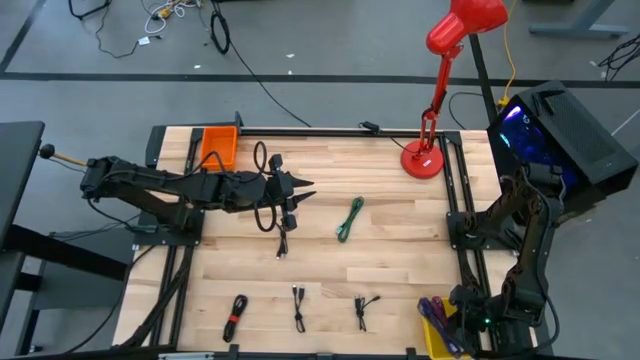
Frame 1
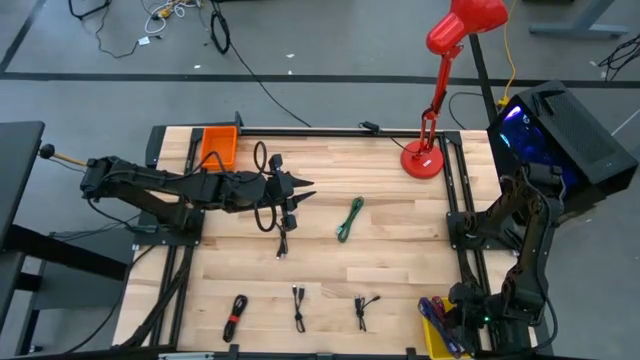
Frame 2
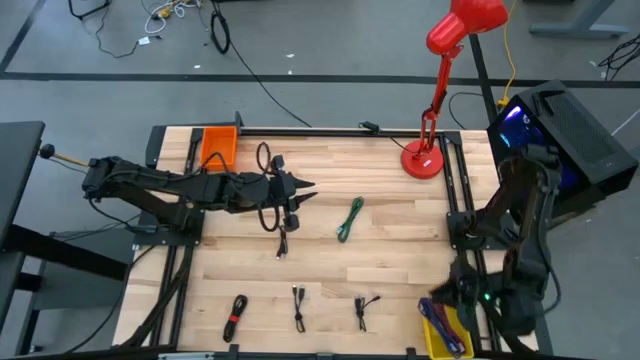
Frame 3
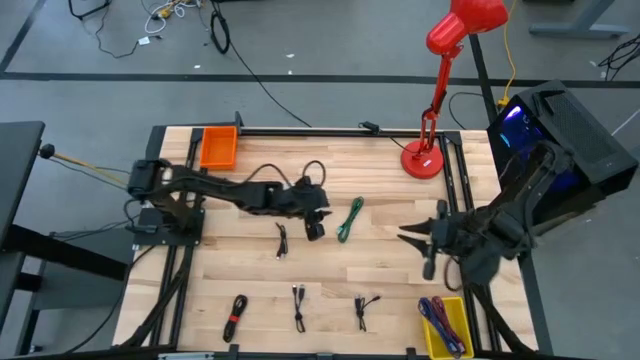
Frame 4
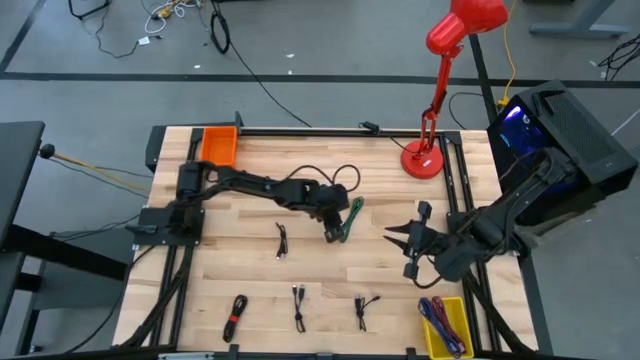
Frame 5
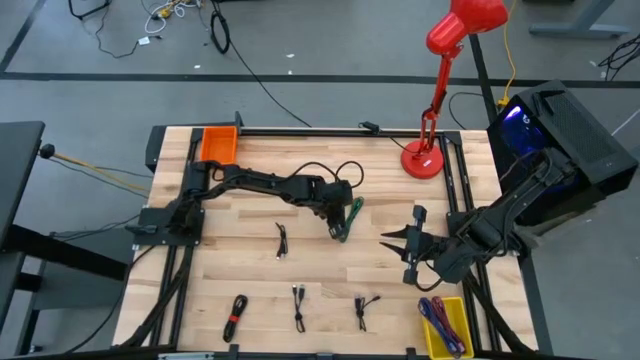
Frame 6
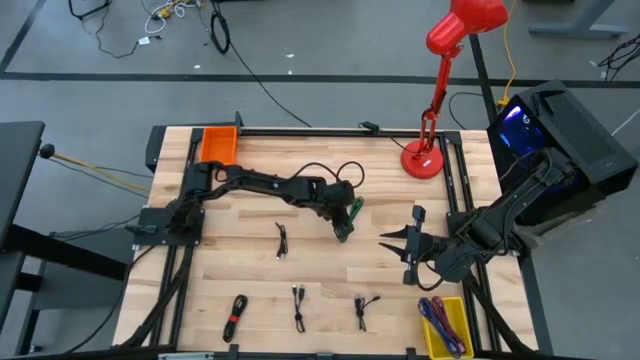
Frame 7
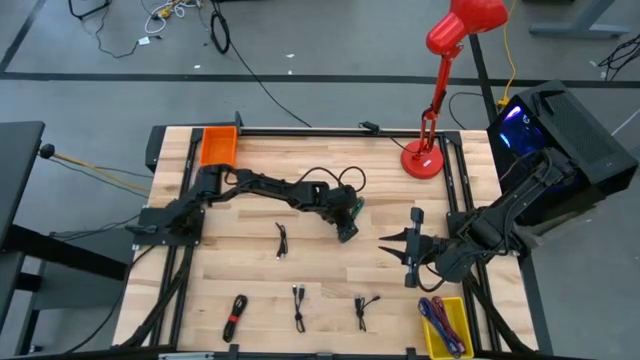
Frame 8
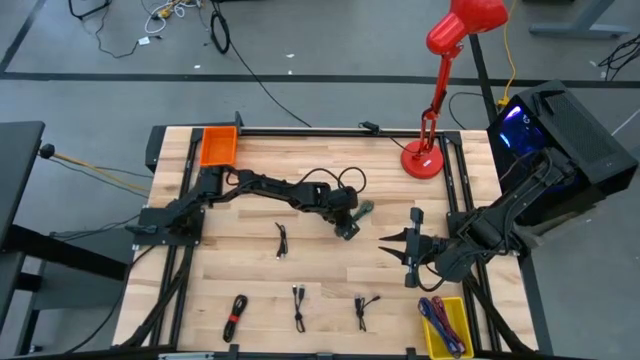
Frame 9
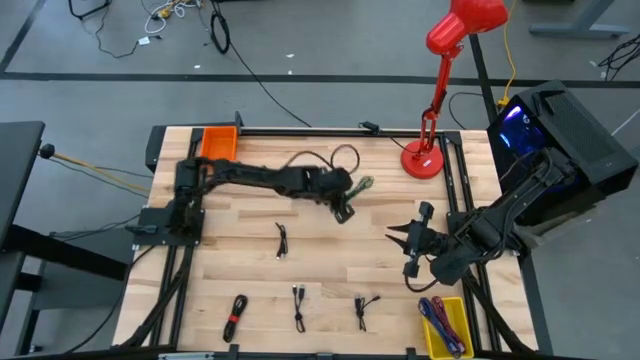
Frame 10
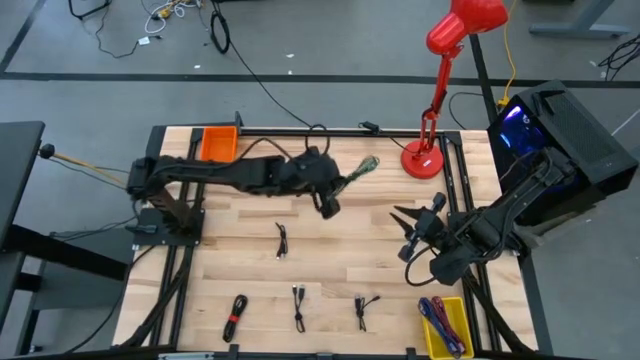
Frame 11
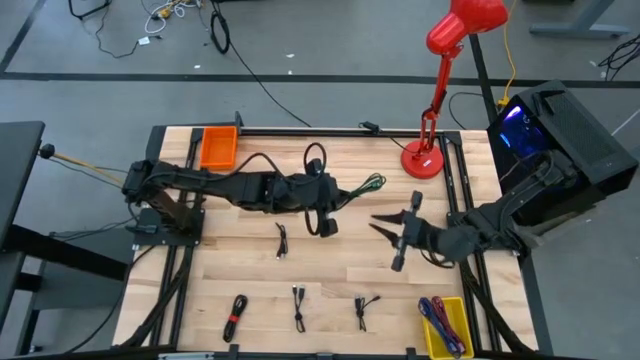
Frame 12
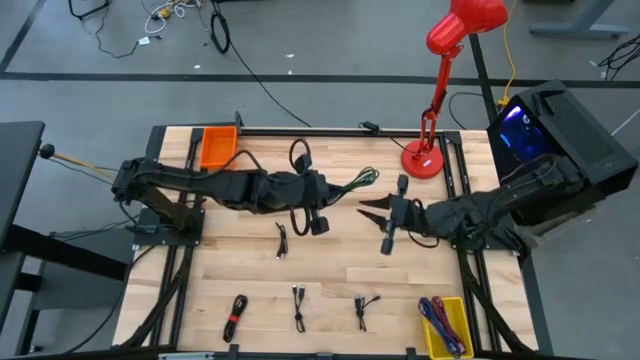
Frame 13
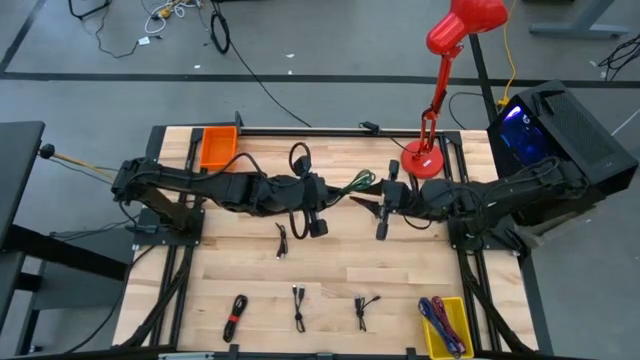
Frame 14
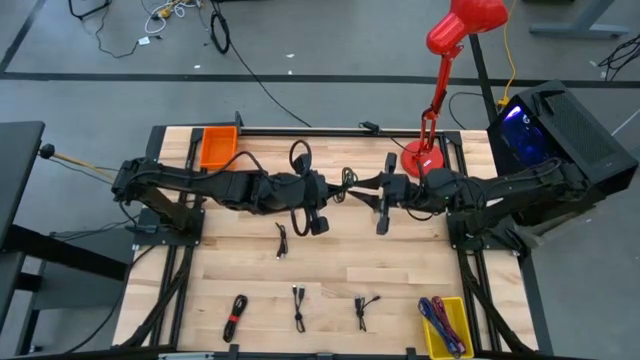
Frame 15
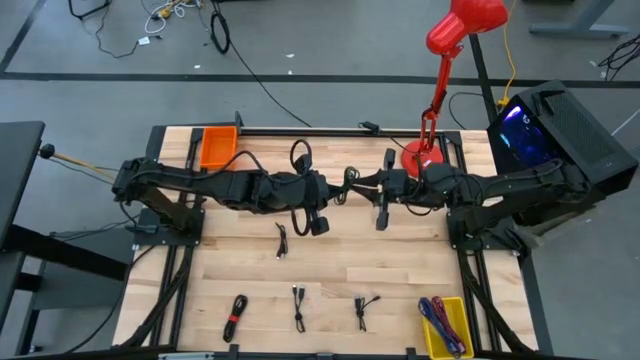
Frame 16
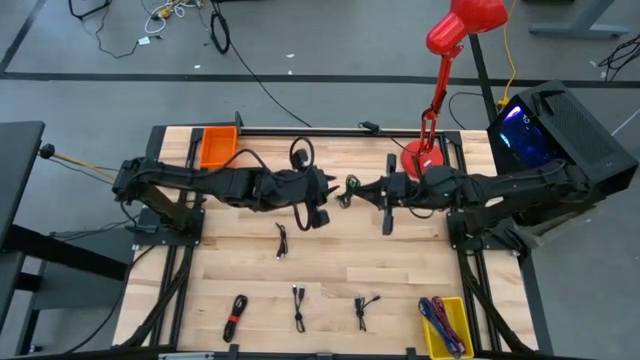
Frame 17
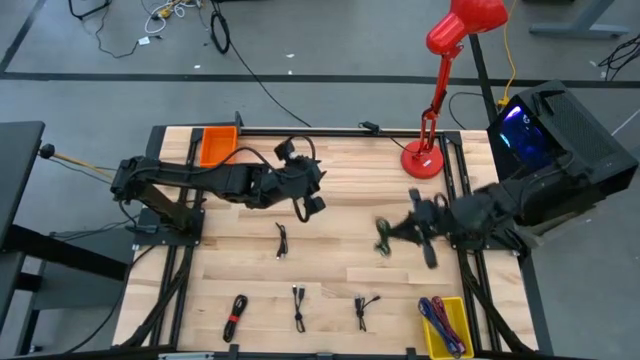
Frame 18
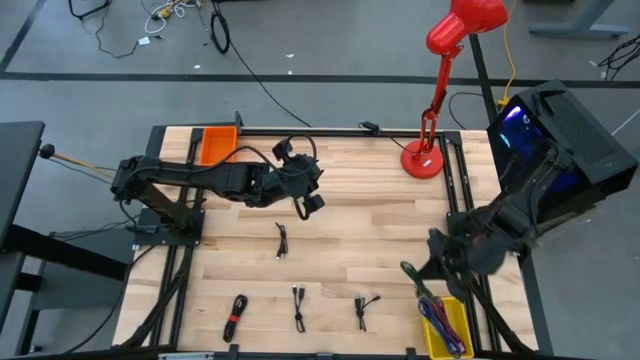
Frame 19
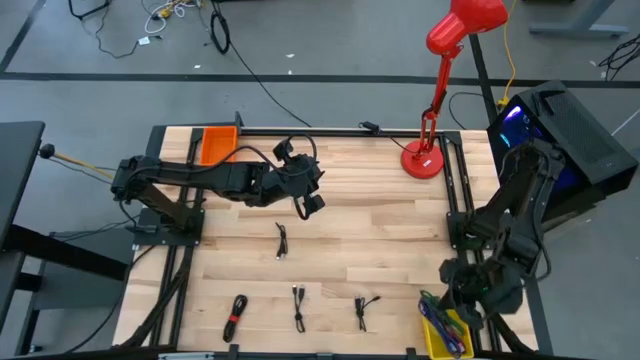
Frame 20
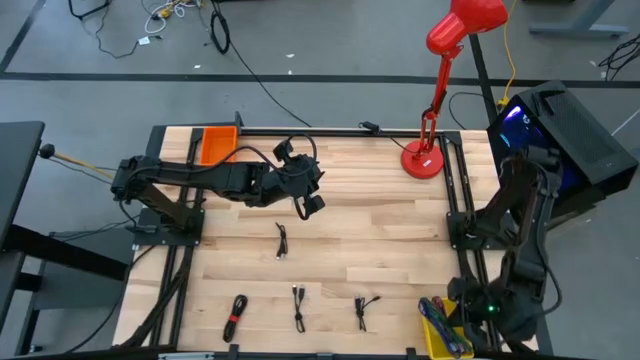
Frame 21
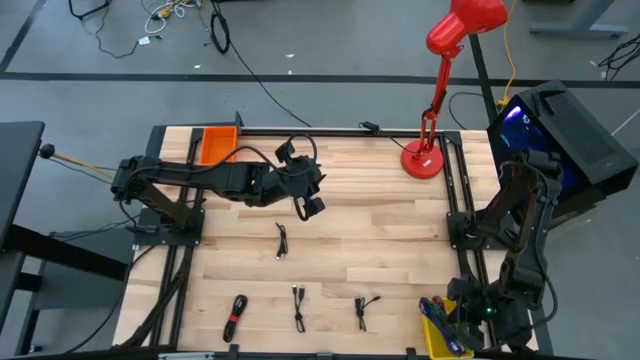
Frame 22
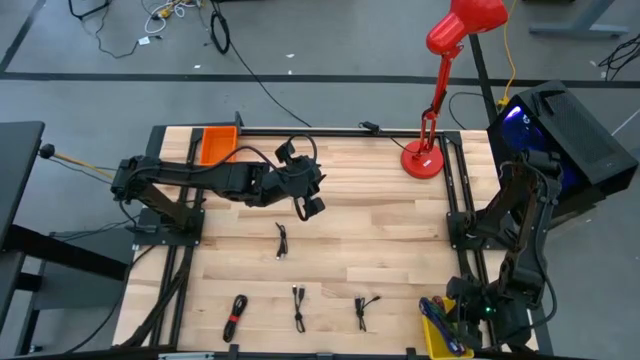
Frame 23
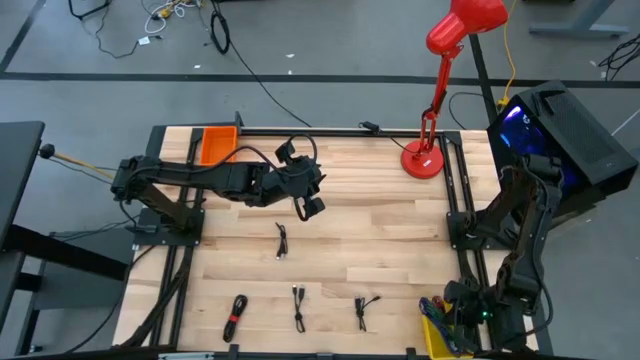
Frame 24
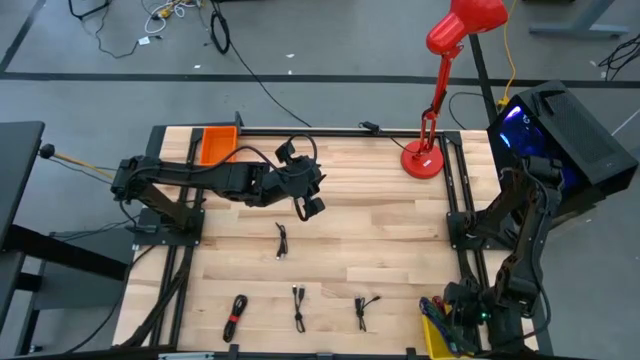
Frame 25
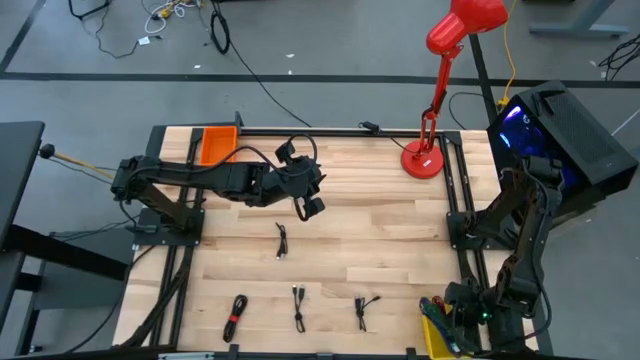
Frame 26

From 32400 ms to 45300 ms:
Task: Pick & Place USB Port
Put the green patterned charger cable into the yellow bin

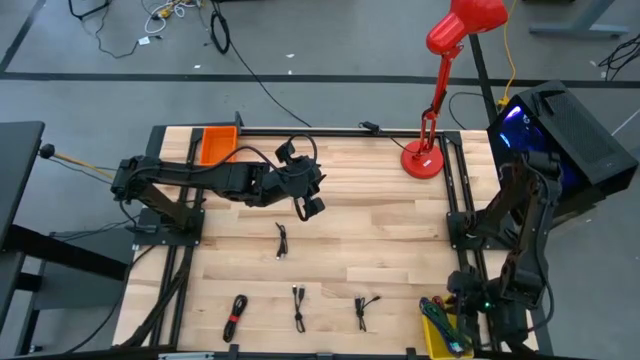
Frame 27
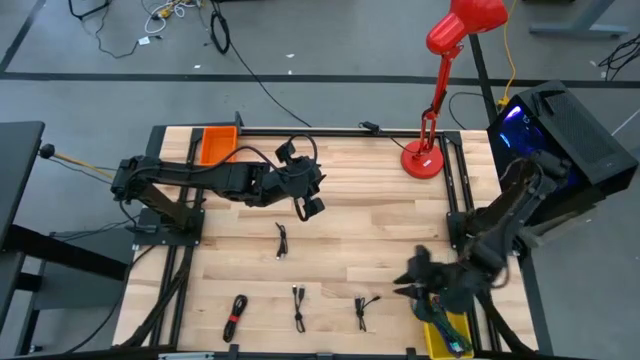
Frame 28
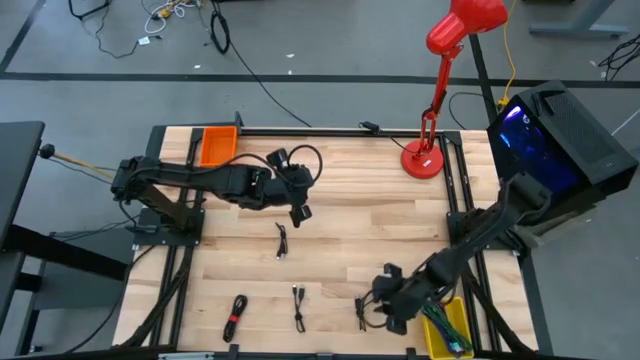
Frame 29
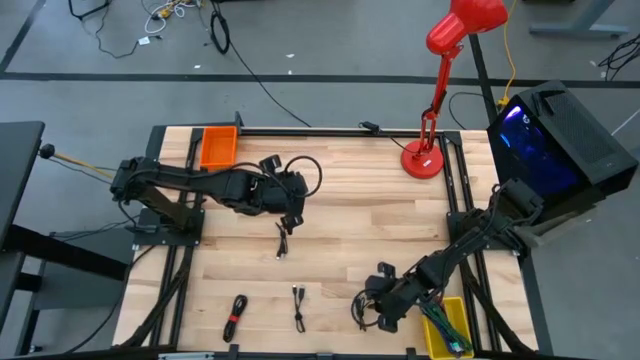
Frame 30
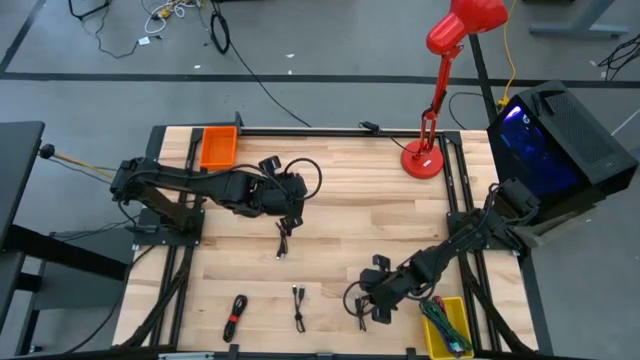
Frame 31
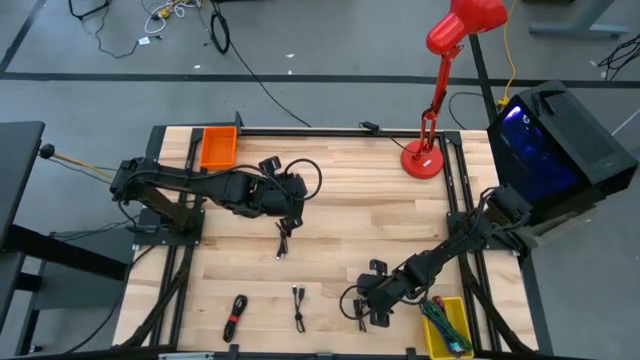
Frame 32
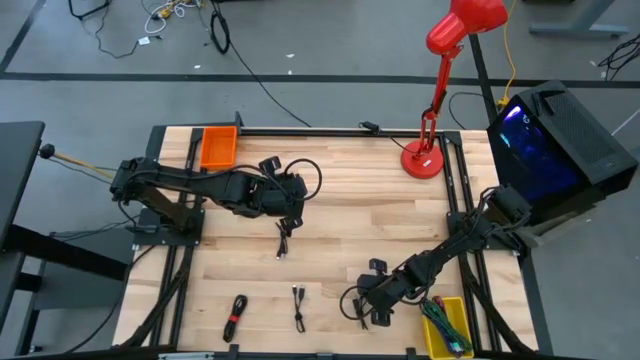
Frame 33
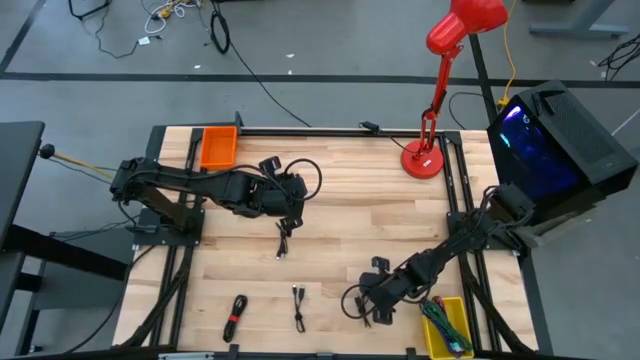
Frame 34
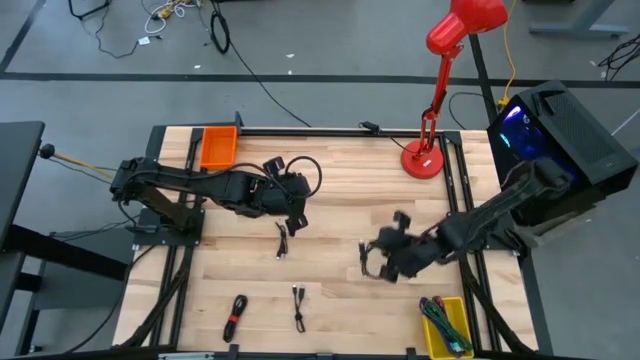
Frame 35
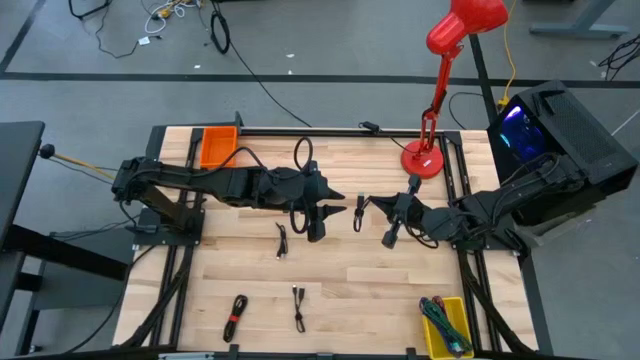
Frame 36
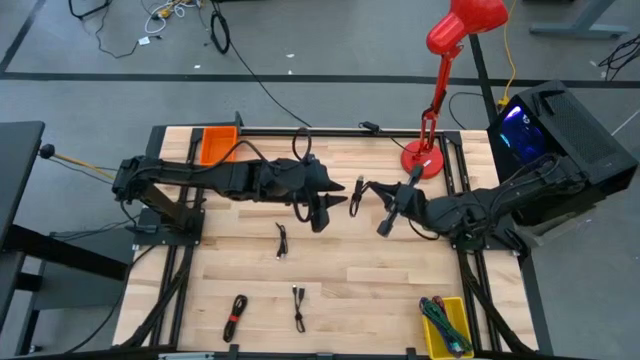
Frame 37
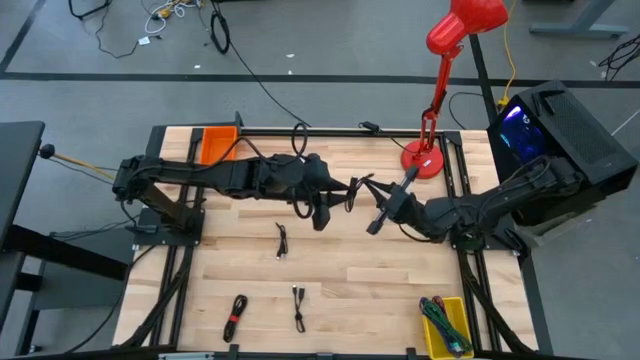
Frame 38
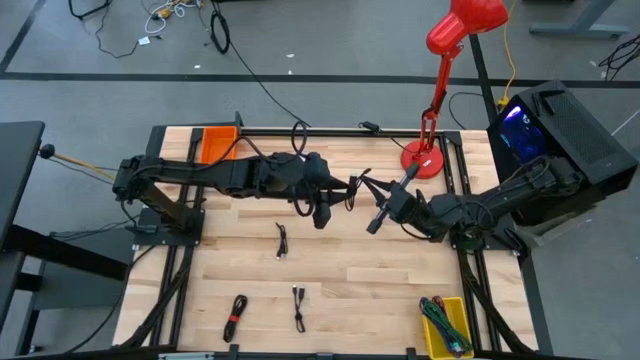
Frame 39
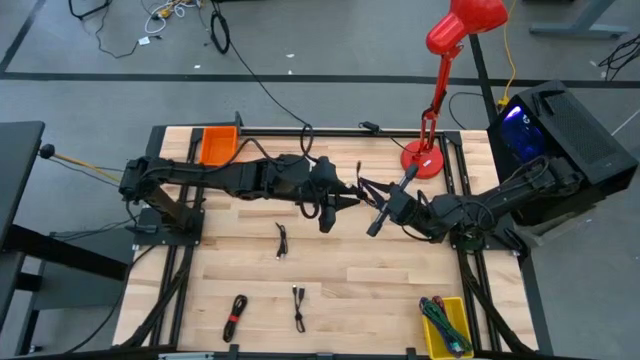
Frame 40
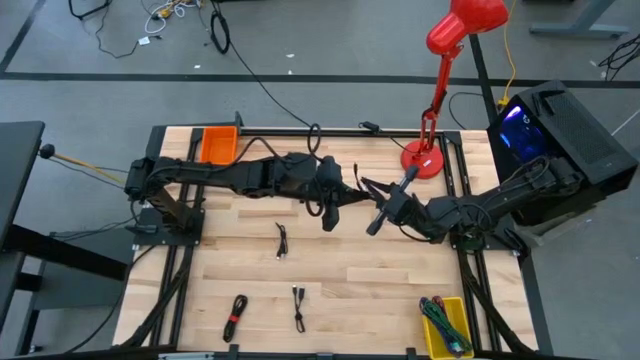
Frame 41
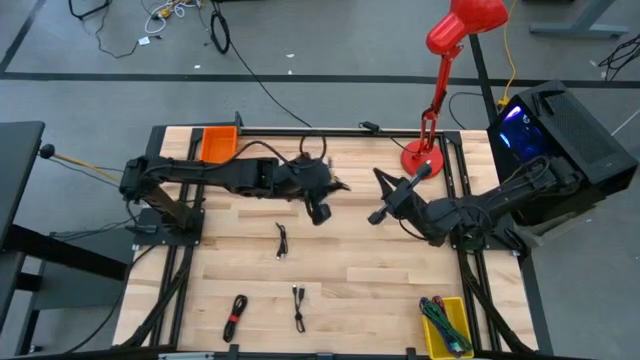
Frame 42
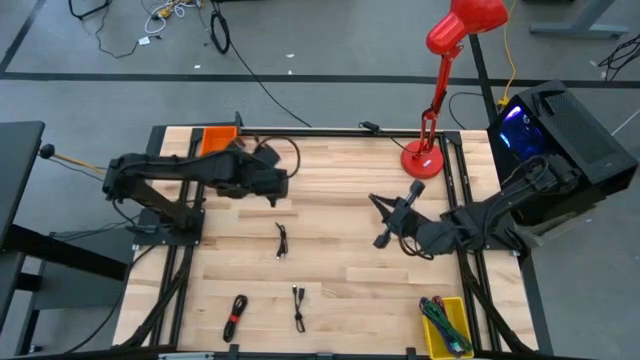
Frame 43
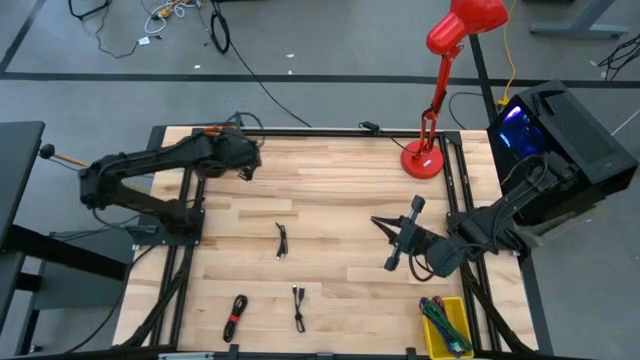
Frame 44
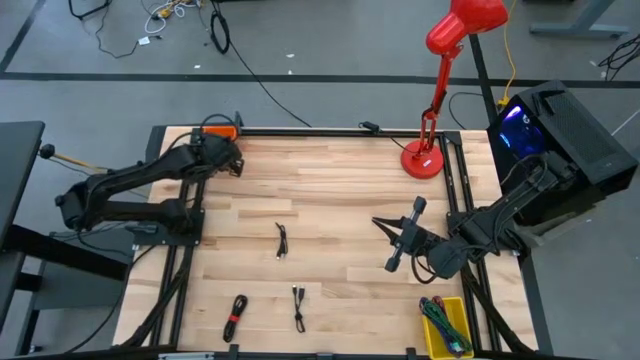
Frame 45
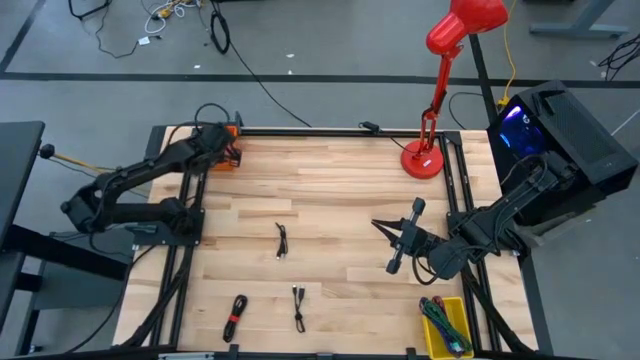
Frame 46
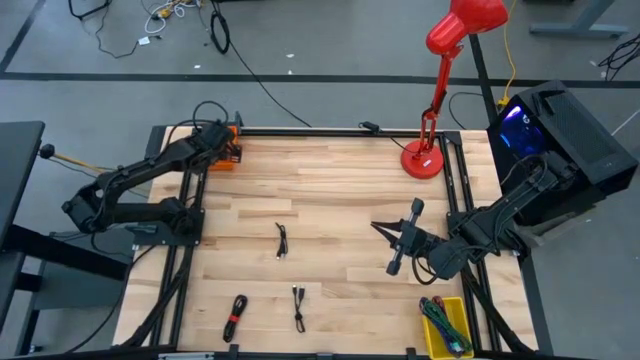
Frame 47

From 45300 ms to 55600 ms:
Put the black charger cable into the orange bin
